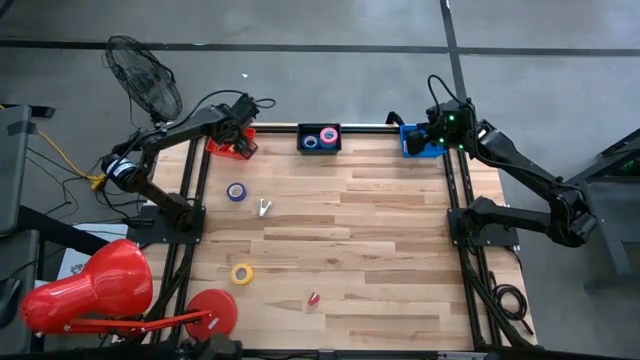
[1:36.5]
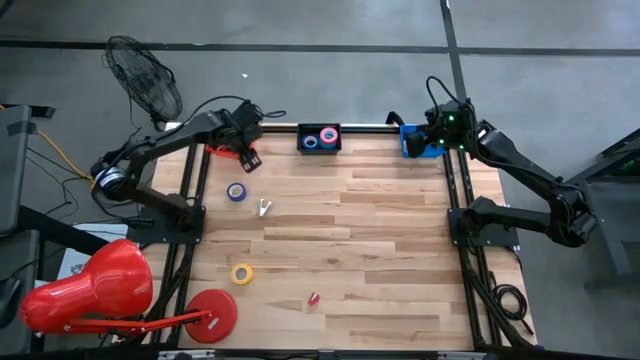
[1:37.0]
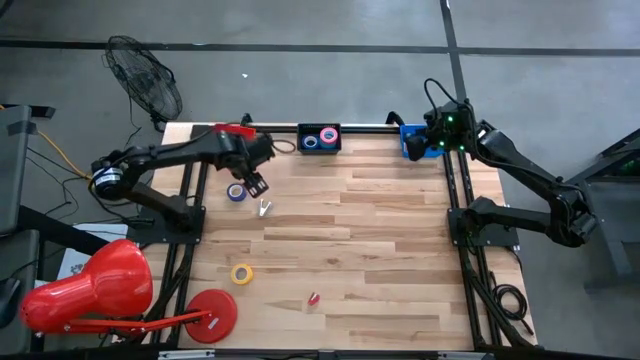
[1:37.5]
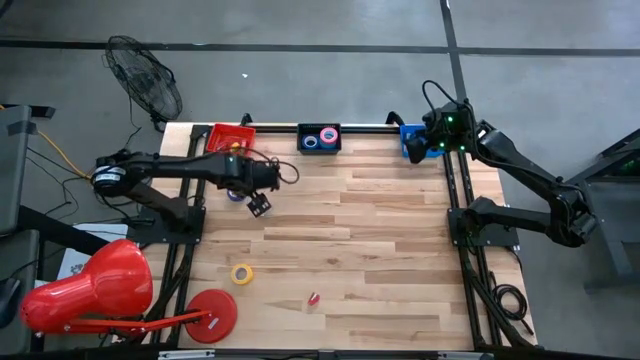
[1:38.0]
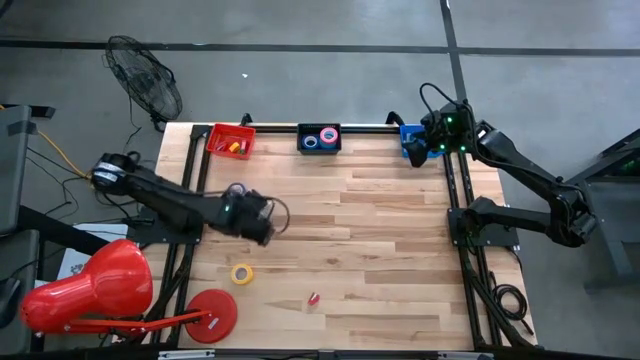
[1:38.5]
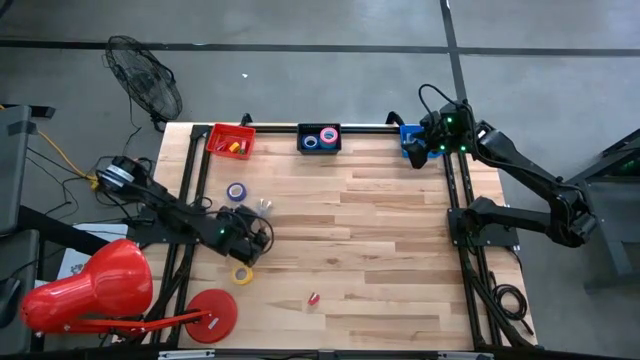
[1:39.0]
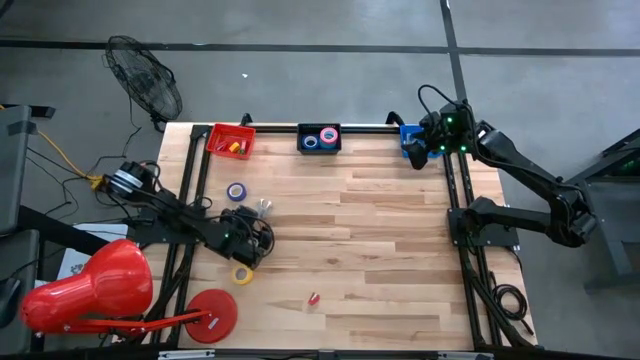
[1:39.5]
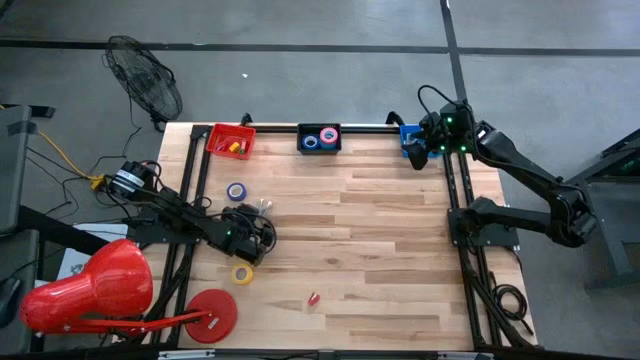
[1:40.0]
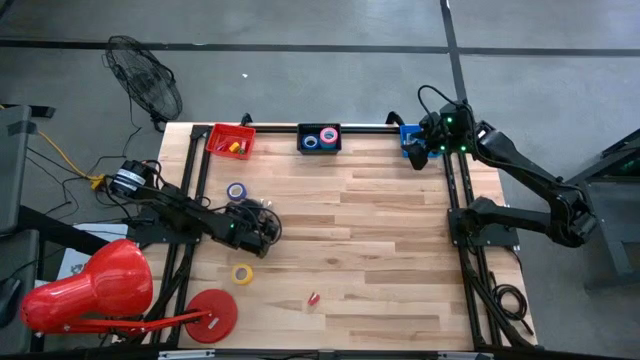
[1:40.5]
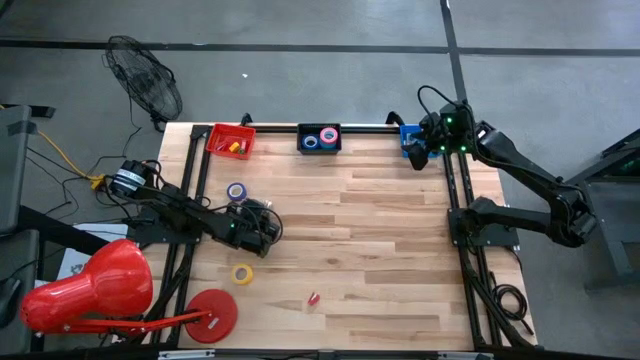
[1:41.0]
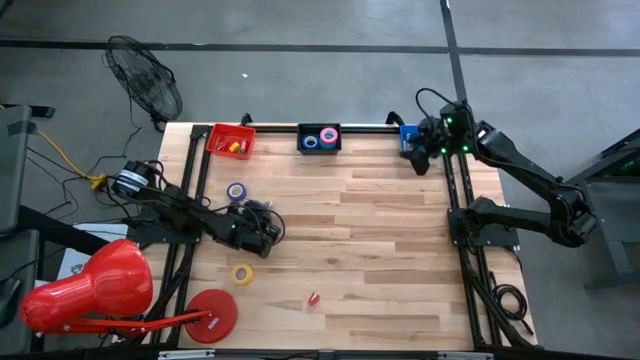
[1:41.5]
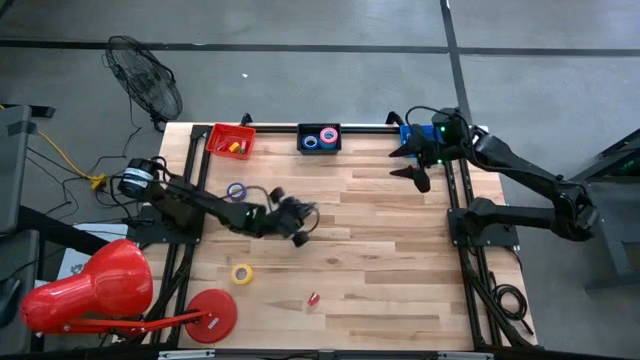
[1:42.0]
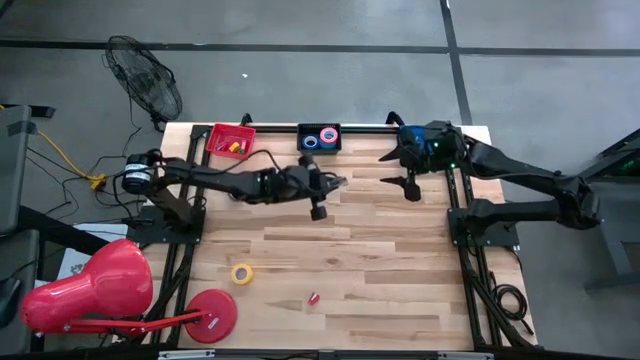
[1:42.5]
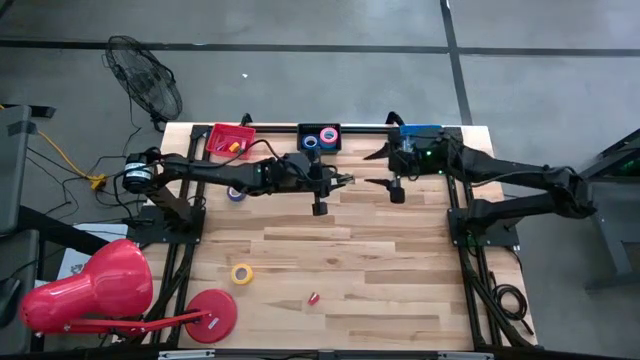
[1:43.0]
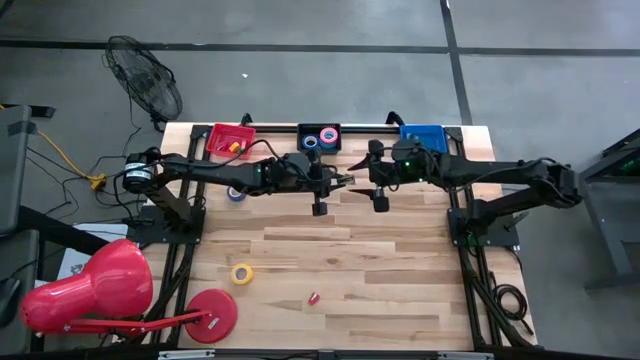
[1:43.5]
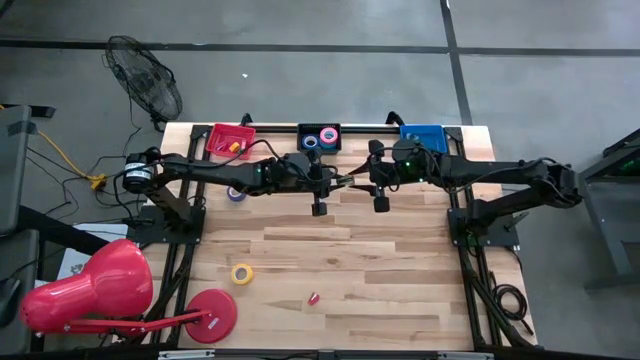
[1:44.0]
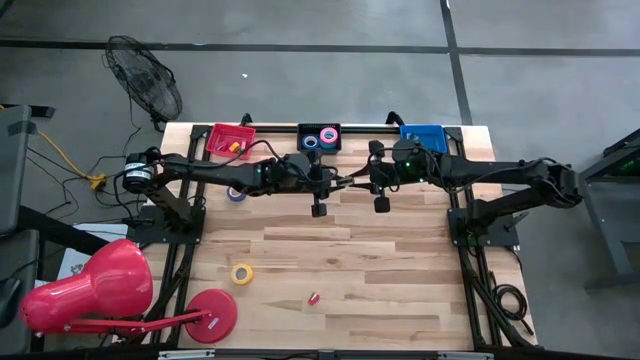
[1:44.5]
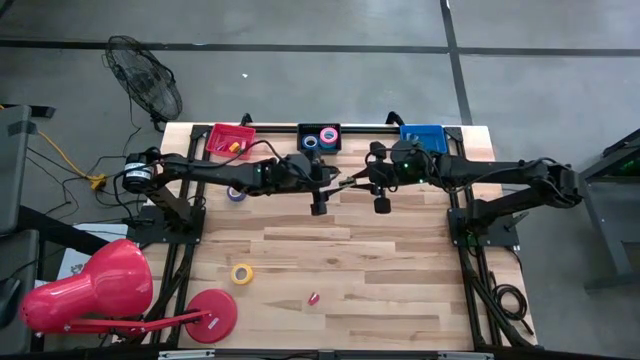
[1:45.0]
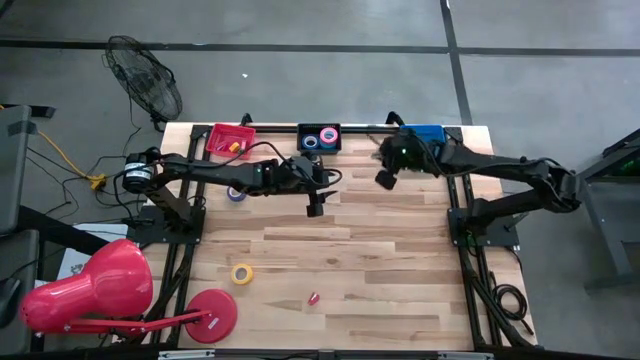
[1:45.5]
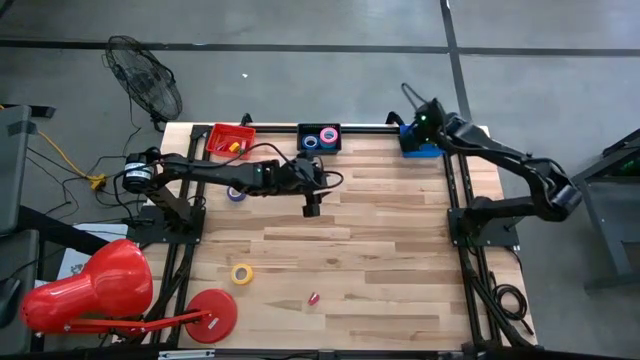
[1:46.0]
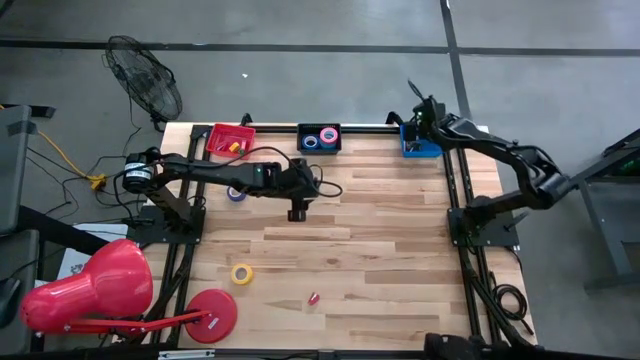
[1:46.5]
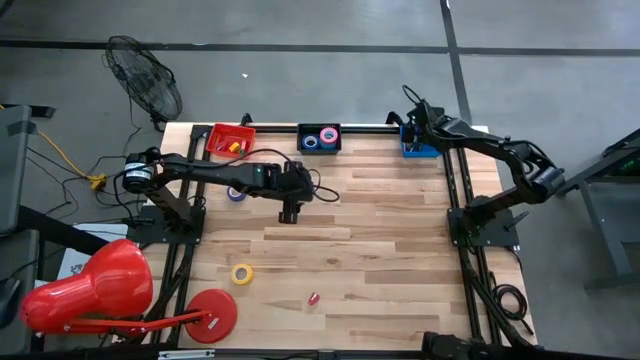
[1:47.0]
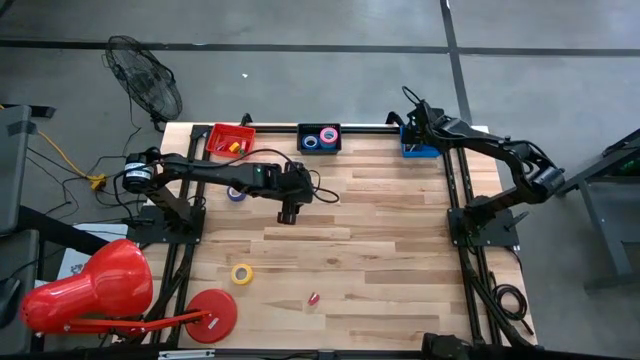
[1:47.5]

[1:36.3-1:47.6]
Task: Pick and place Stapler, Stapler remover, tape
Put the grey staple remover into the blue bin

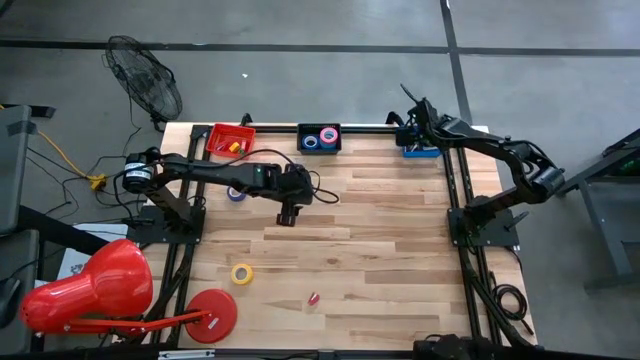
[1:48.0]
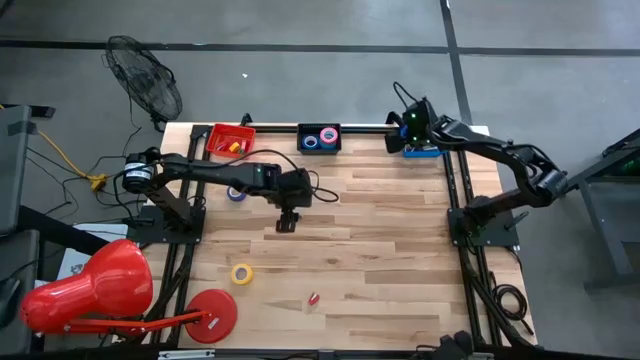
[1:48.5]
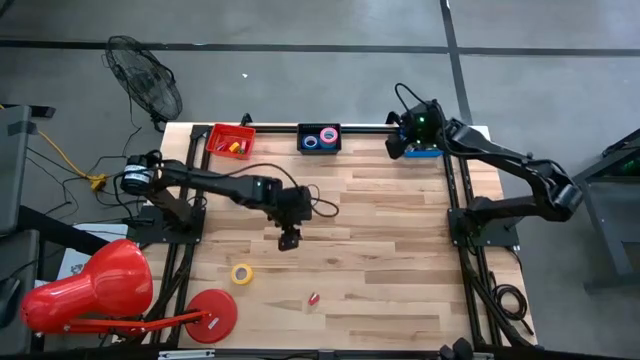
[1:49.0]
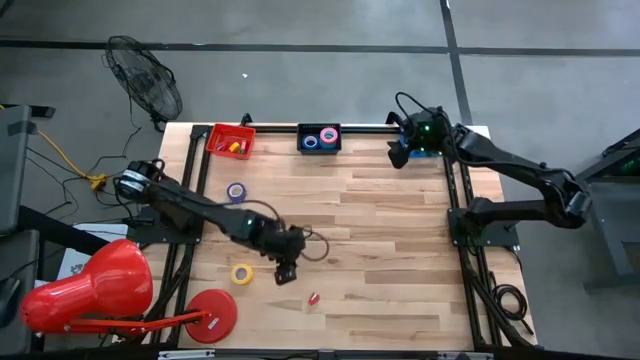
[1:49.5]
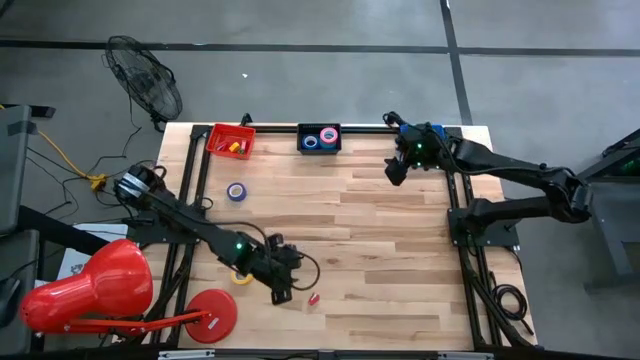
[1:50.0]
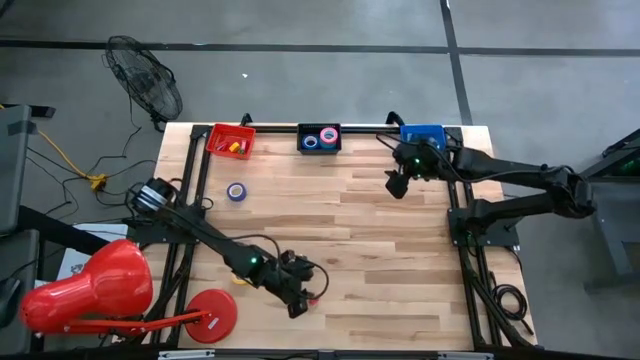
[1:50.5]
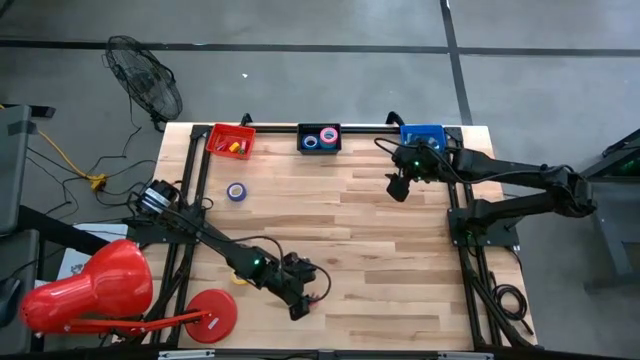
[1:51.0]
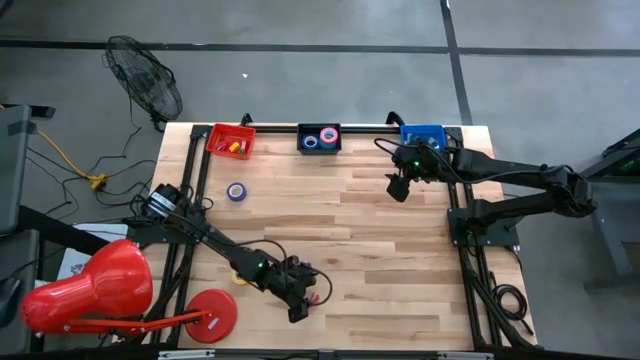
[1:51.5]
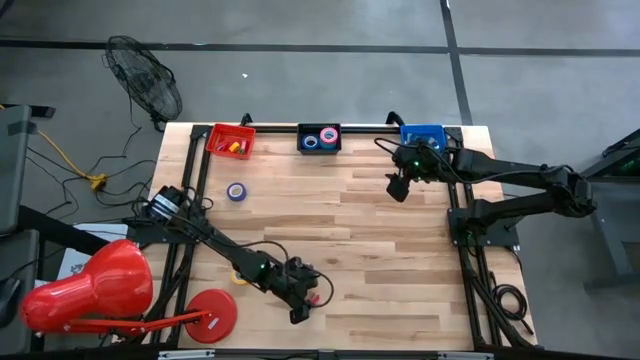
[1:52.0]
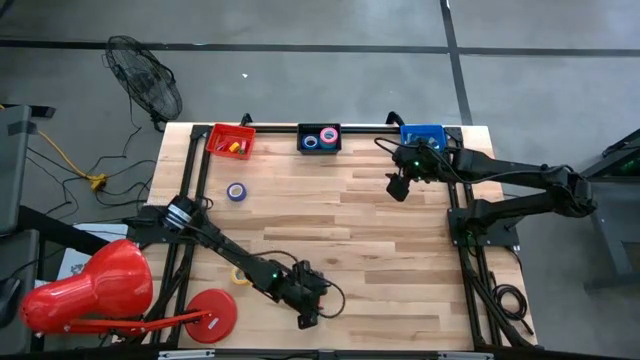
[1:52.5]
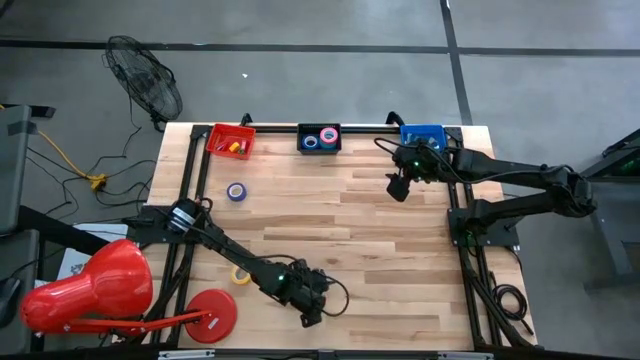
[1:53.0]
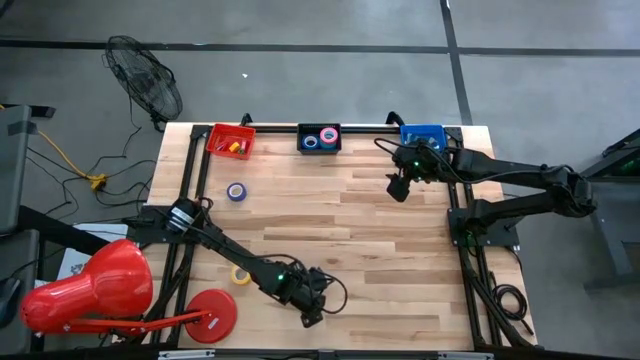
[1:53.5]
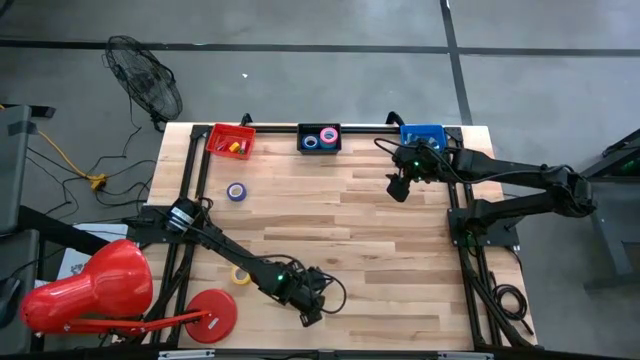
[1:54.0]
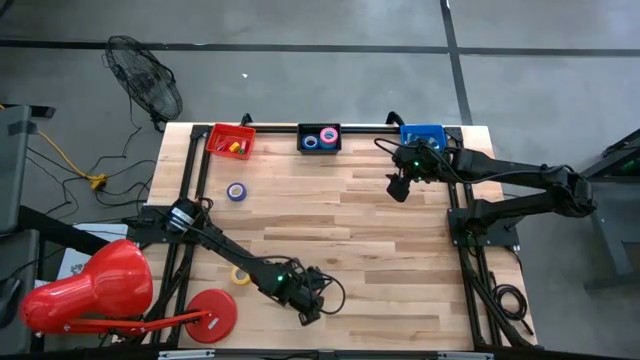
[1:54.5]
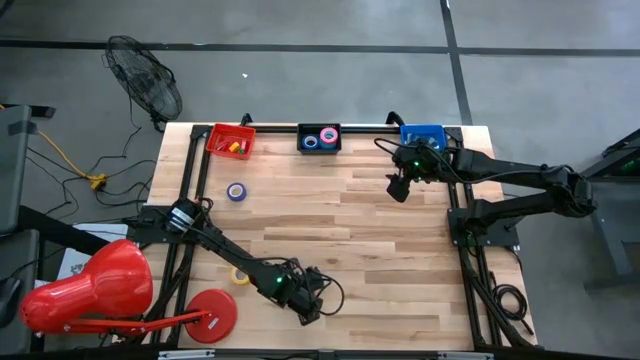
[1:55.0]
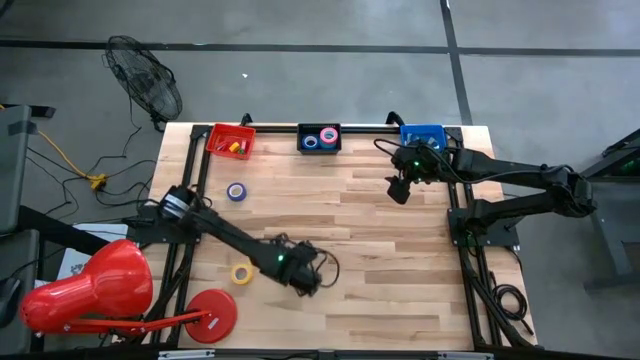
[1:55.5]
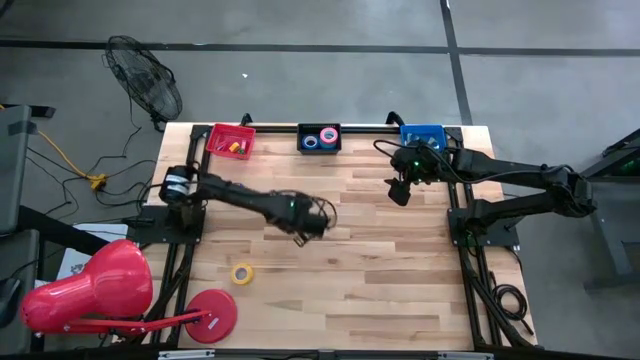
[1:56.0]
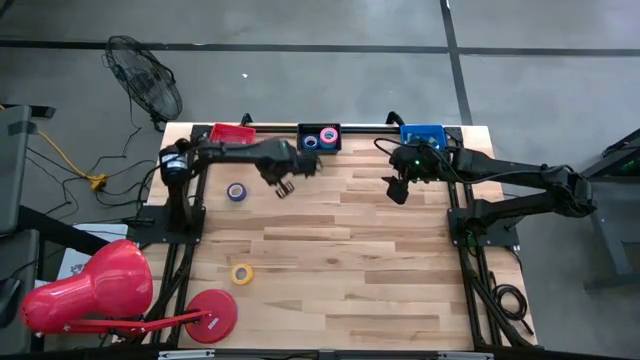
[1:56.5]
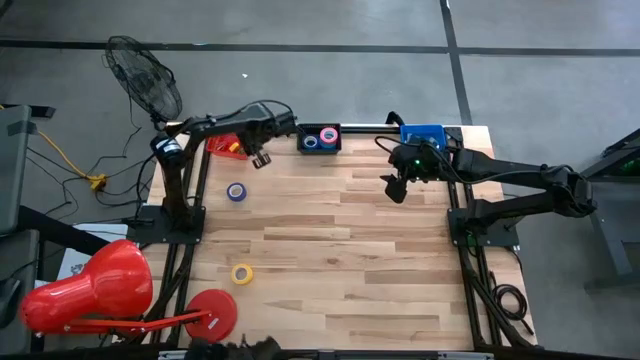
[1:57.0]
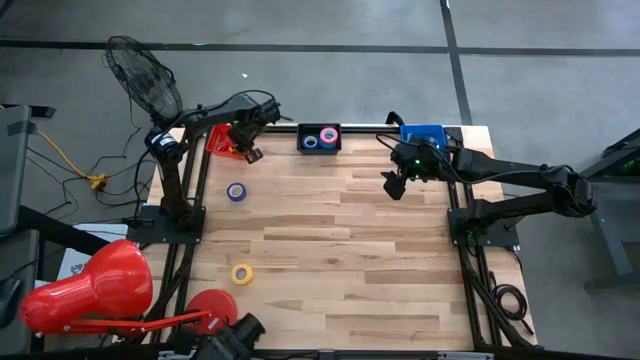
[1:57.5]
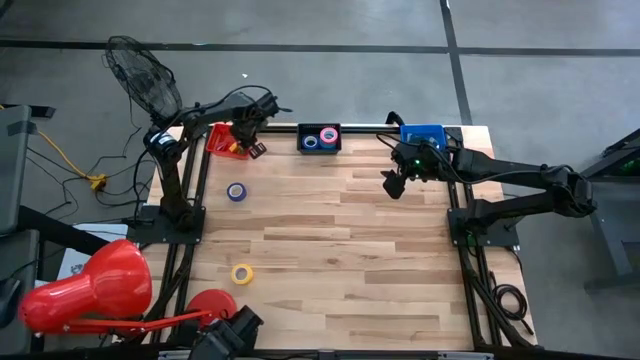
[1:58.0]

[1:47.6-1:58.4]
Put the red stapler into the red bin
